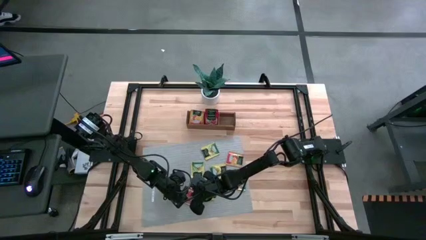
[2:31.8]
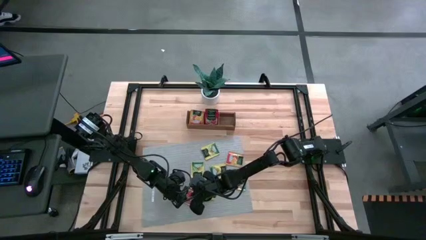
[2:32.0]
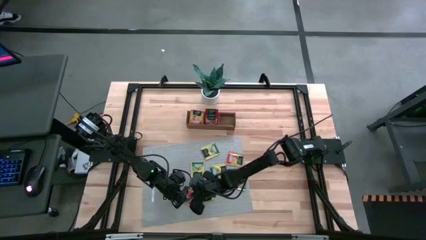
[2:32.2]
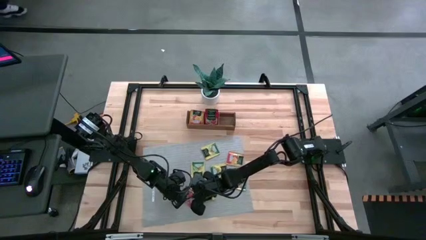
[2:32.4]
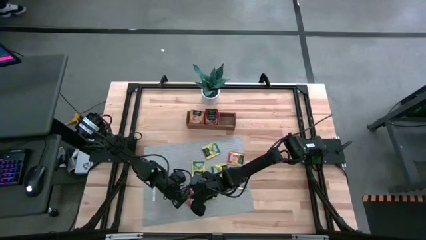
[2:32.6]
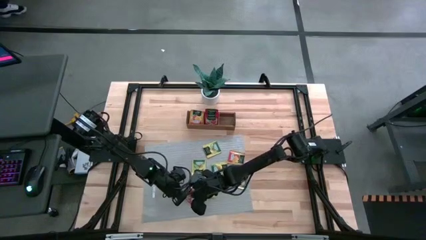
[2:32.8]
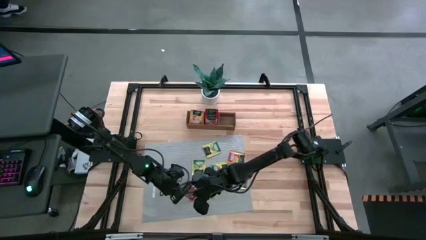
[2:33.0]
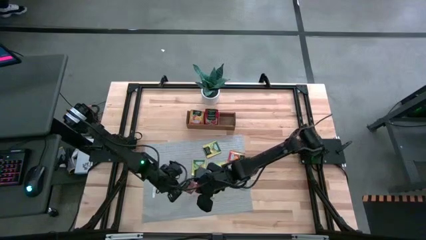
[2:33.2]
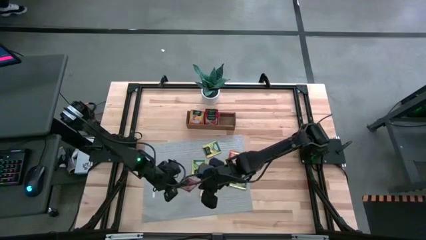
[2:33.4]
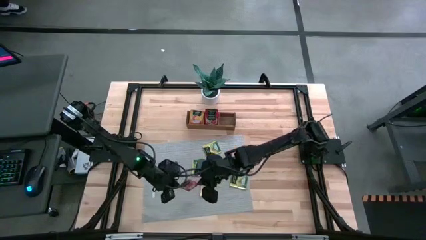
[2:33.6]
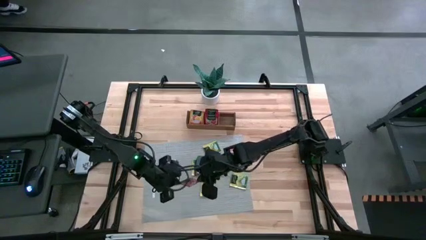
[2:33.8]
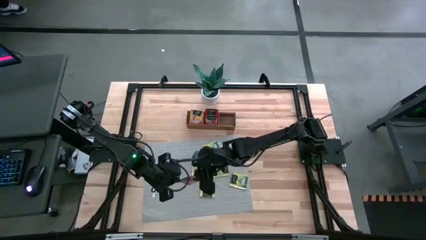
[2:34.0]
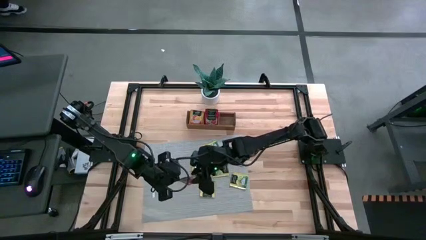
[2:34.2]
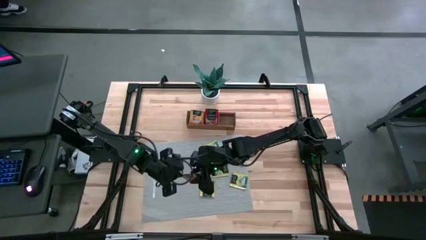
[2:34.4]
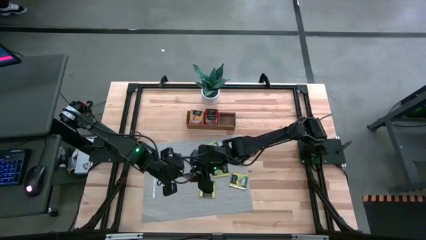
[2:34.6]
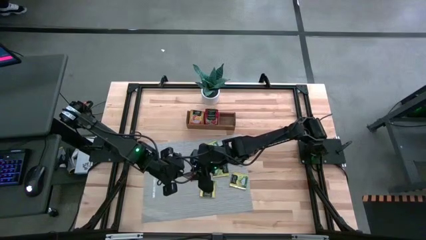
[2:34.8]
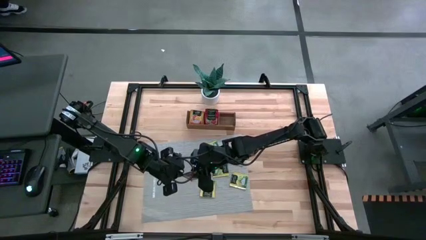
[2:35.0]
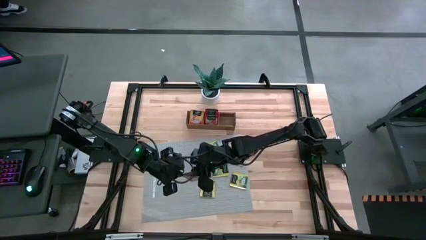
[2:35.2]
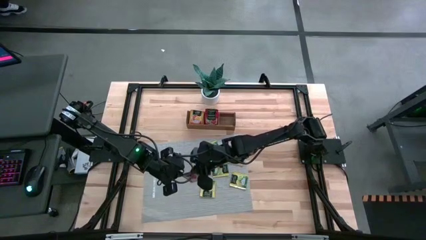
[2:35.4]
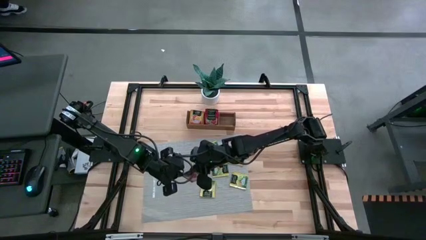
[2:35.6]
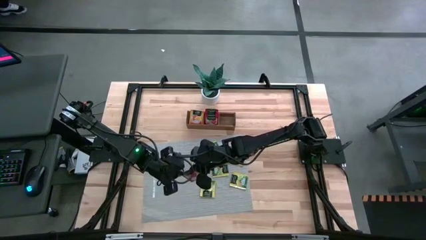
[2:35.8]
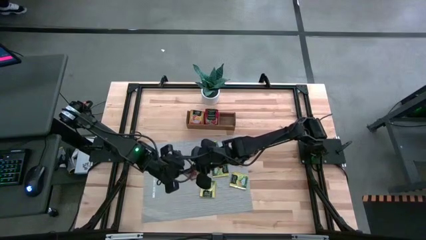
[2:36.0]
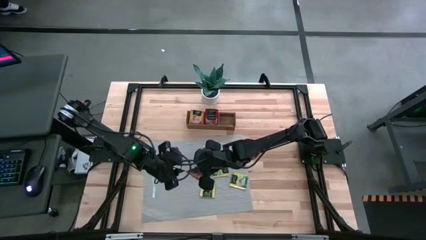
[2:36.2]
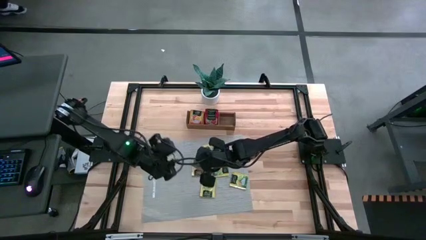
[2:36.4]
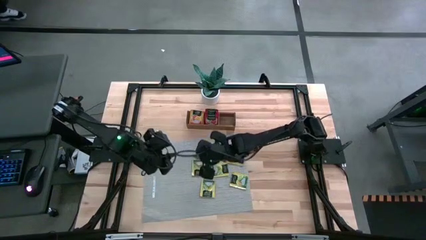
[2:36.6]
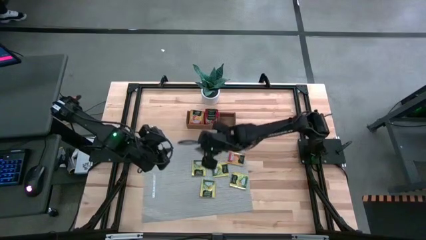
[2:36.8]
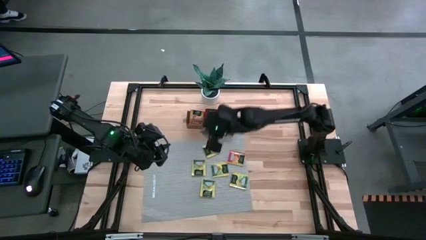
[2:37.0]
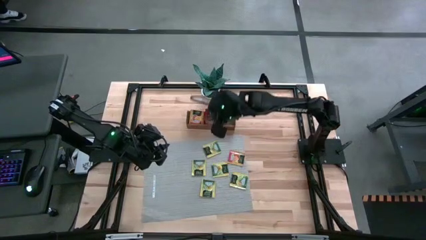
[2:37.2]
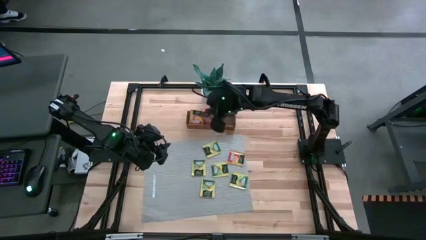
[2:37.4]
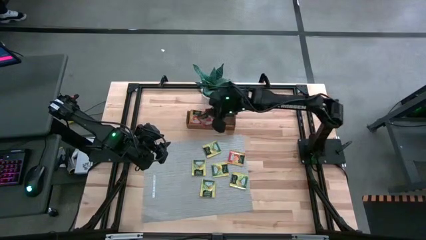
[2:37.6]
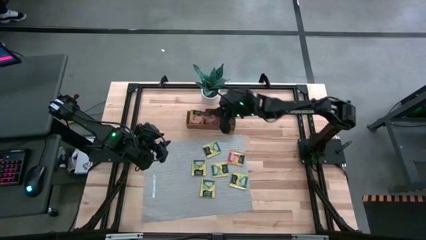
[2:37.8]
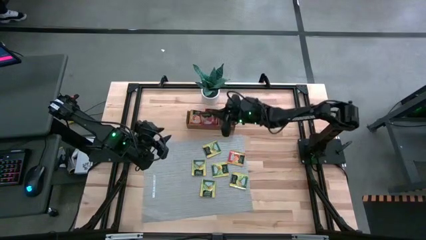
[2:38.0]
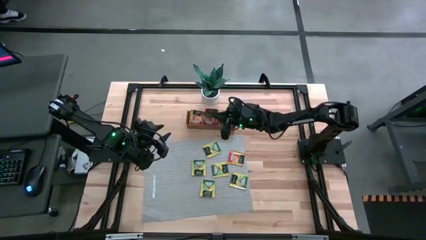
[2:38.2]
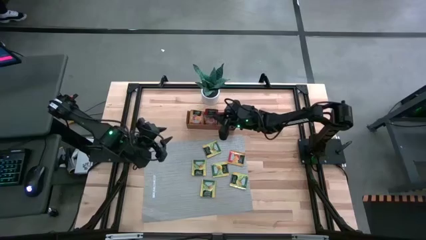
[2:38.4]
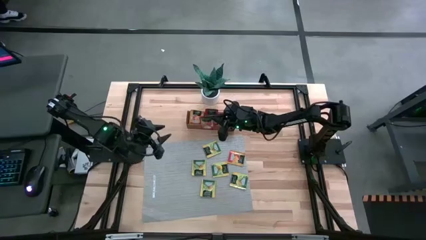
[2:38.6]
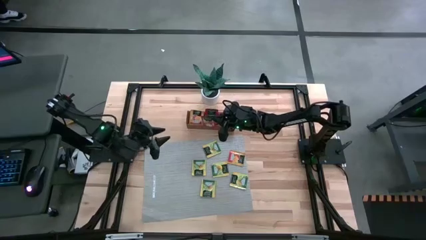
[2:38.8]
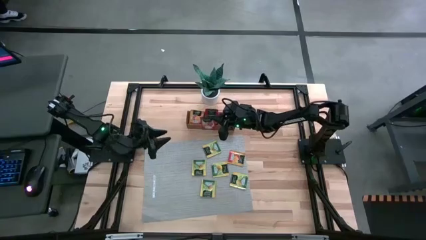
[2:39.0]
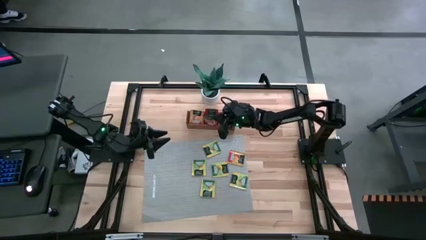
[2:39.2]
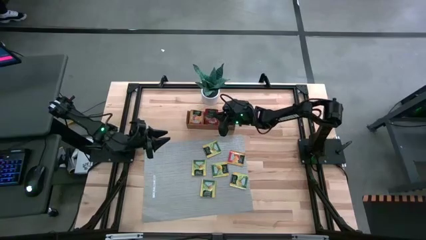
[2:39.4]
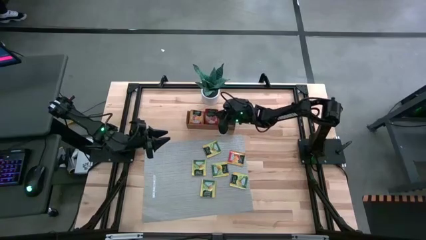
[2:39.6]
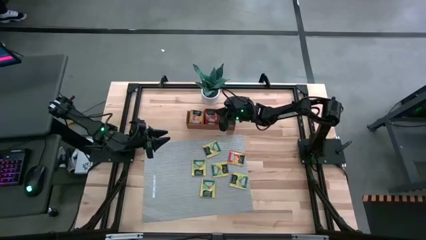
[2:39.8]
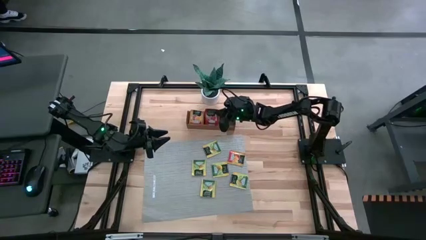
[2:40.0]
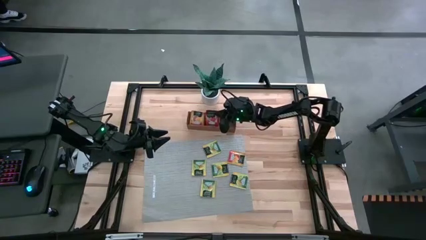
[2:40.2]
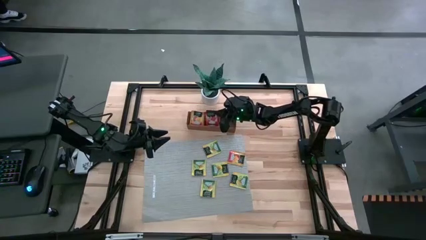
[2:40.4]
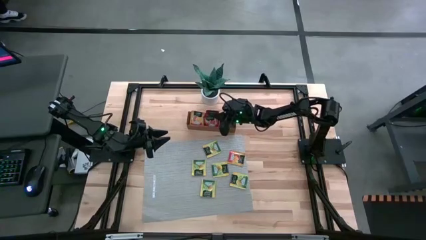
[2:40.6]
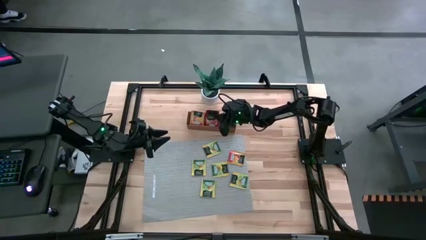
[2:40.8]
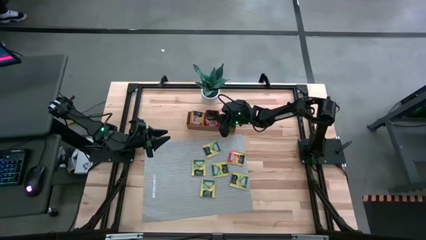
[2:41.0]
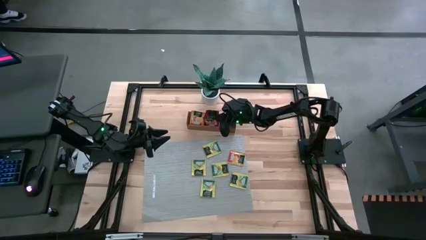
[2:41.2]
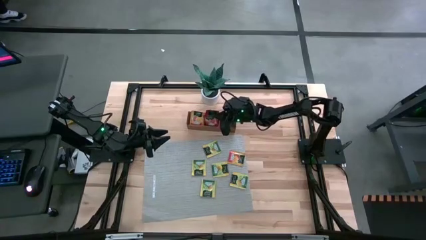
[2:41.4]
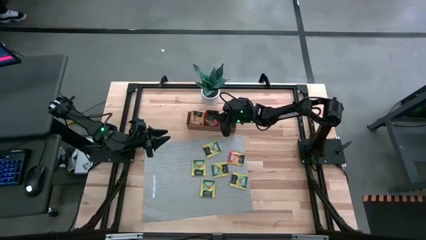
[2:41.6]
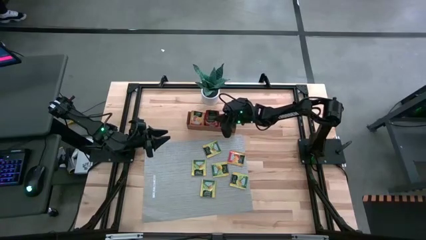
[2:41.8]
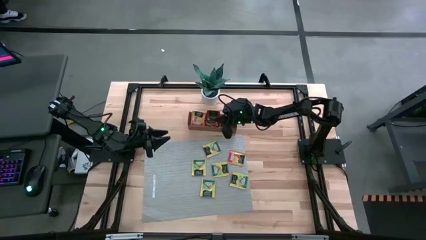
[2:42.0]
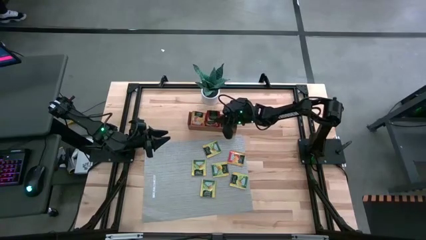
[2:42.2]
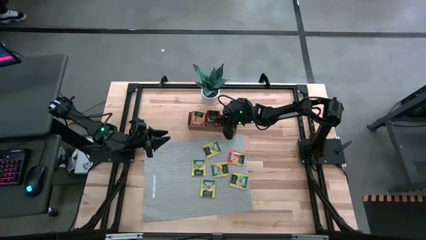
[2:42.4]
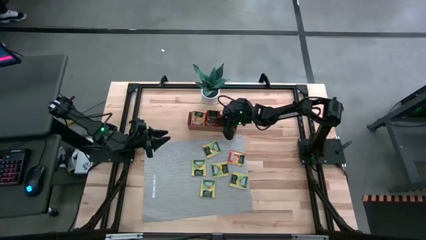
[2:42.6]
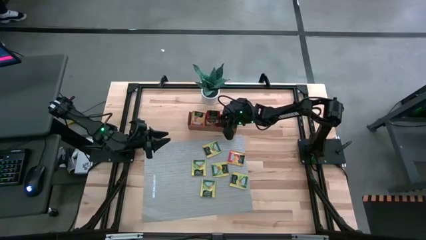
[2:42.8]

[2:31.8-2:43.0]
Task: Pick & Place Tea
Put the red tea bag into the middle section of the wooden organizer
